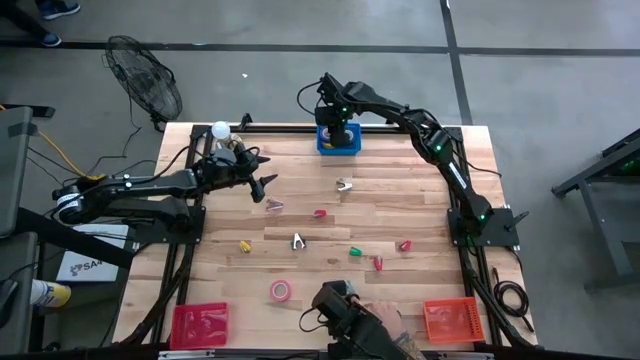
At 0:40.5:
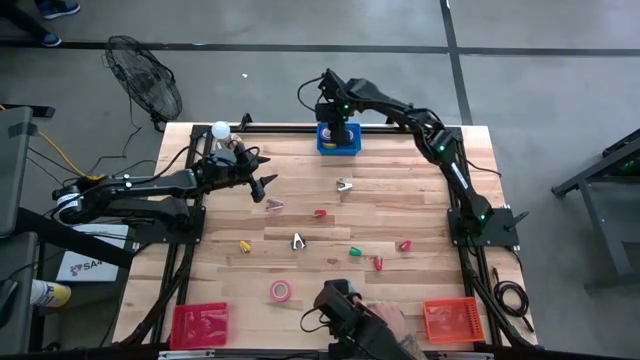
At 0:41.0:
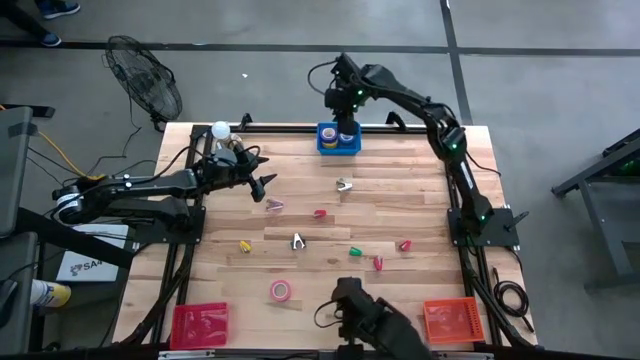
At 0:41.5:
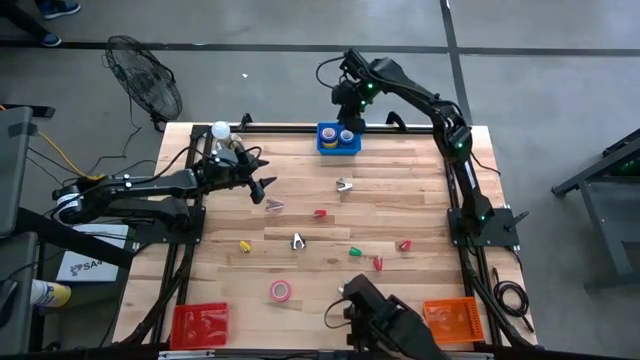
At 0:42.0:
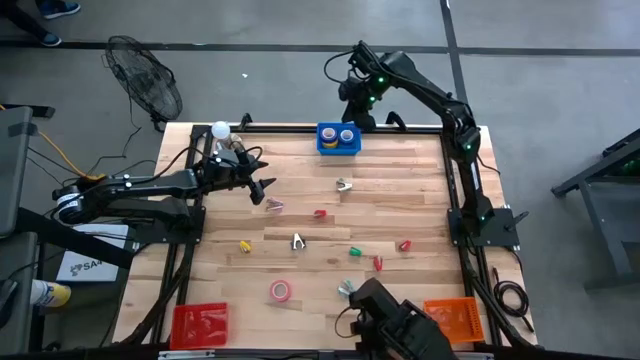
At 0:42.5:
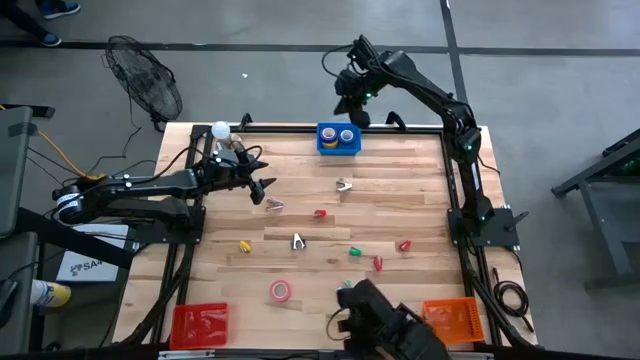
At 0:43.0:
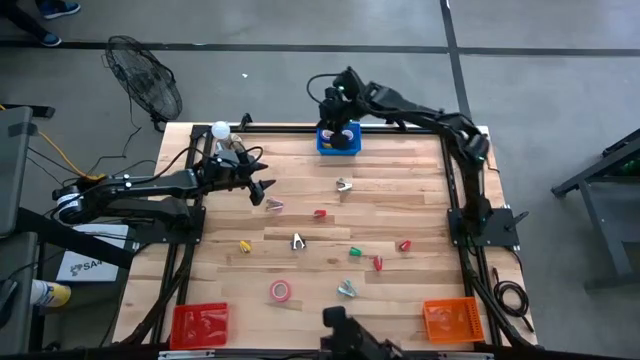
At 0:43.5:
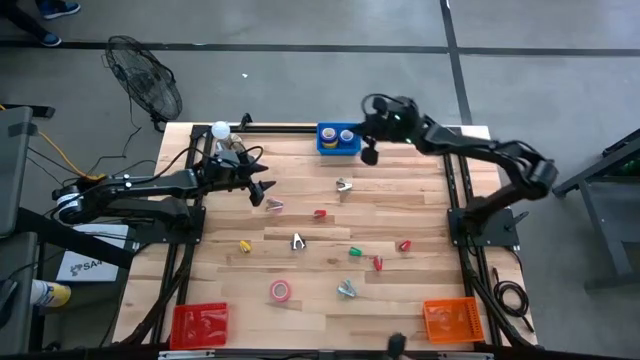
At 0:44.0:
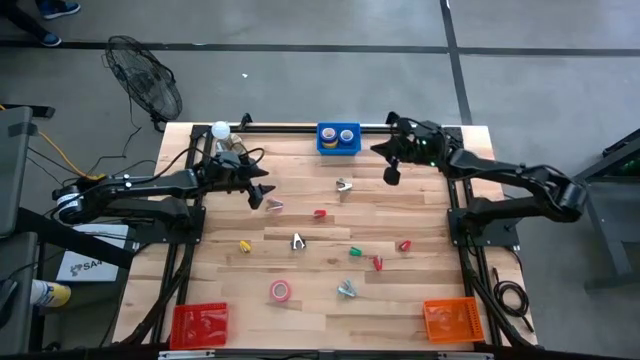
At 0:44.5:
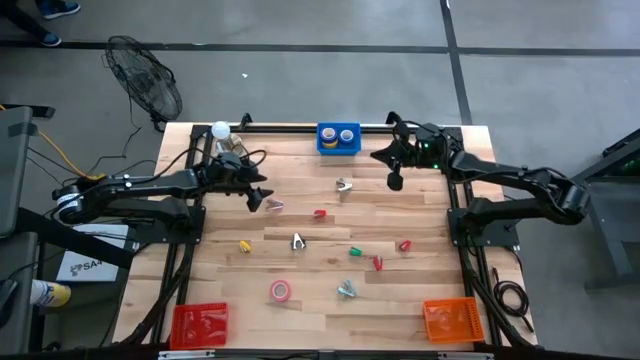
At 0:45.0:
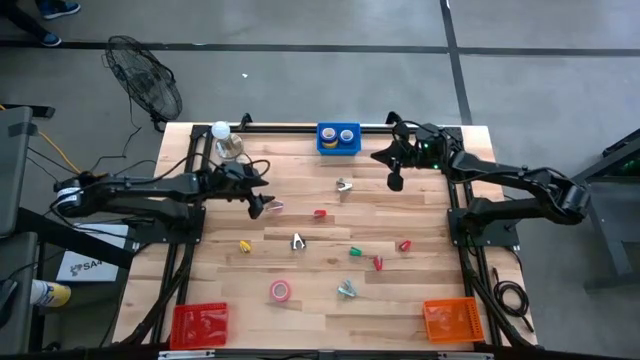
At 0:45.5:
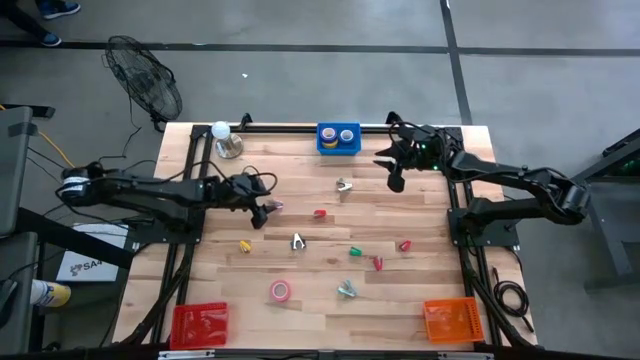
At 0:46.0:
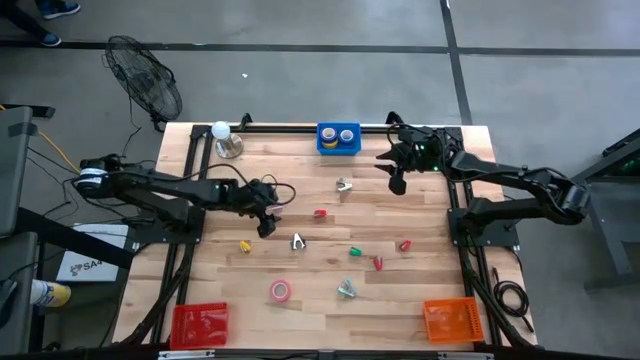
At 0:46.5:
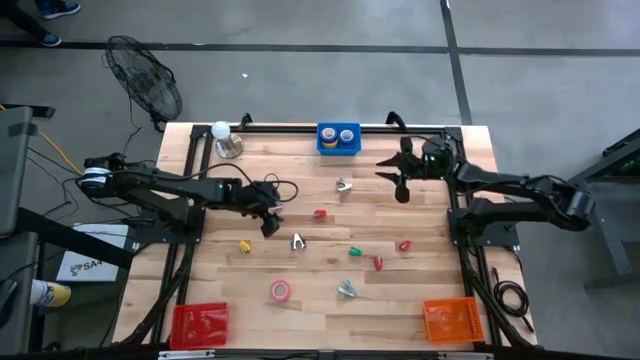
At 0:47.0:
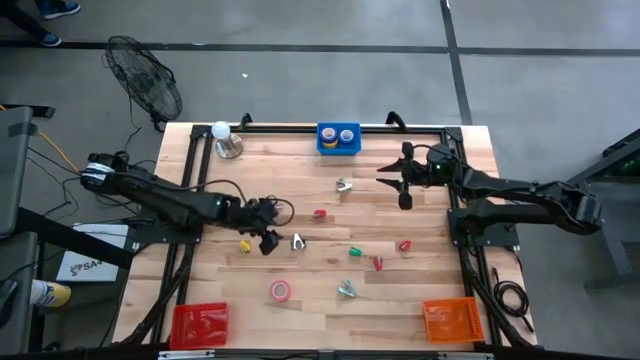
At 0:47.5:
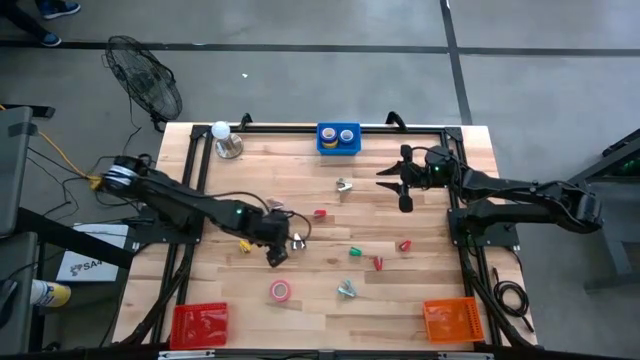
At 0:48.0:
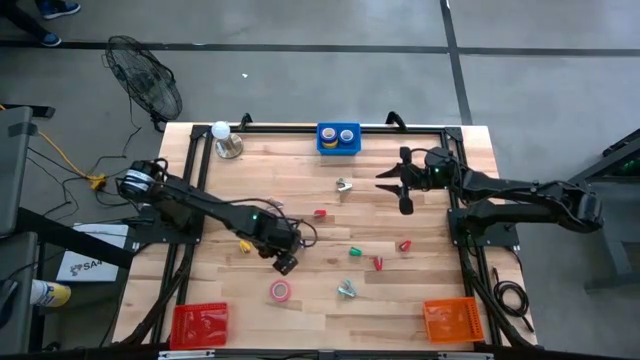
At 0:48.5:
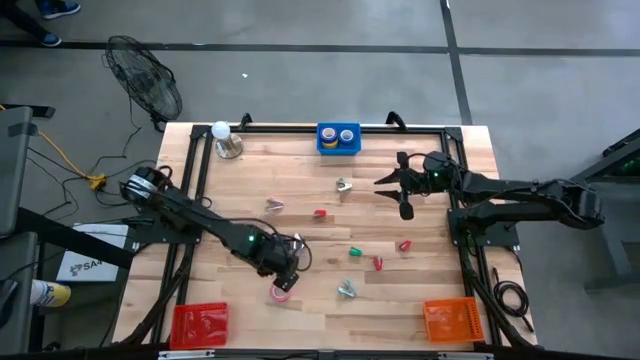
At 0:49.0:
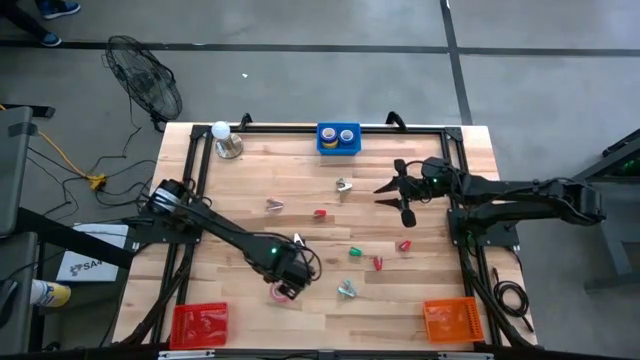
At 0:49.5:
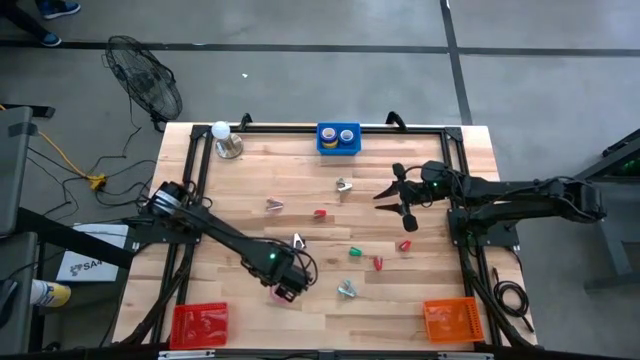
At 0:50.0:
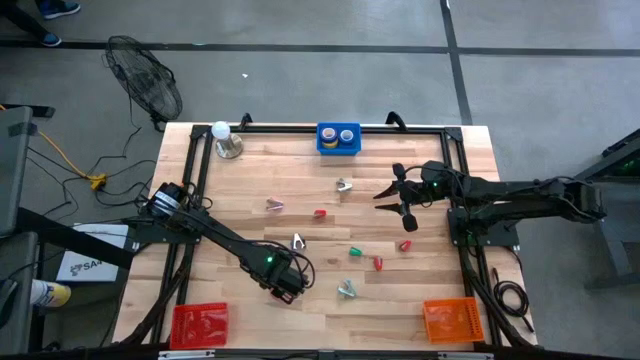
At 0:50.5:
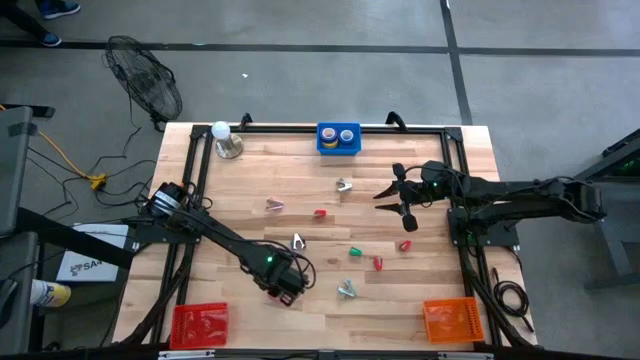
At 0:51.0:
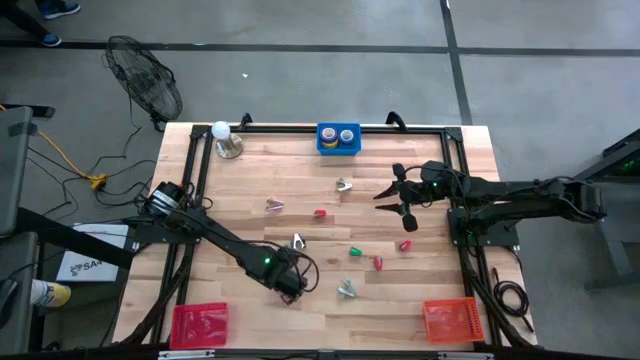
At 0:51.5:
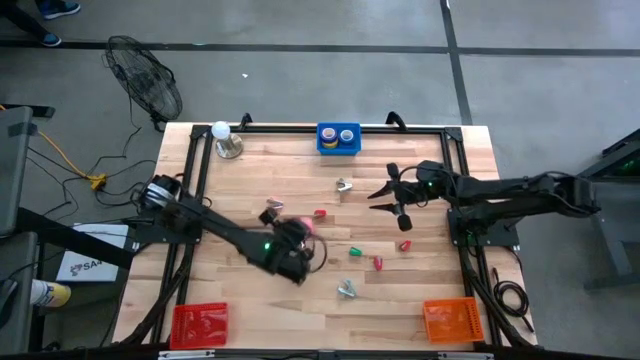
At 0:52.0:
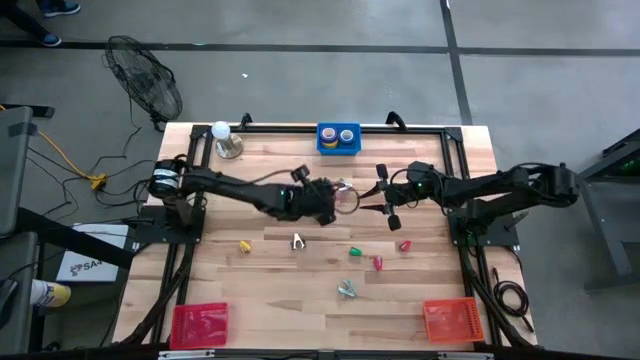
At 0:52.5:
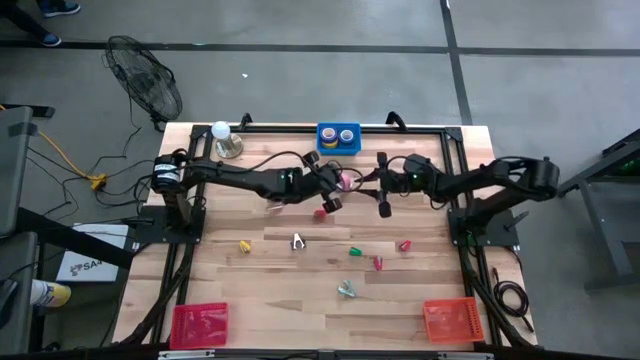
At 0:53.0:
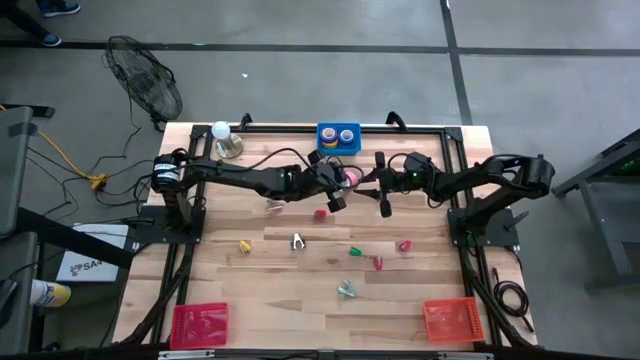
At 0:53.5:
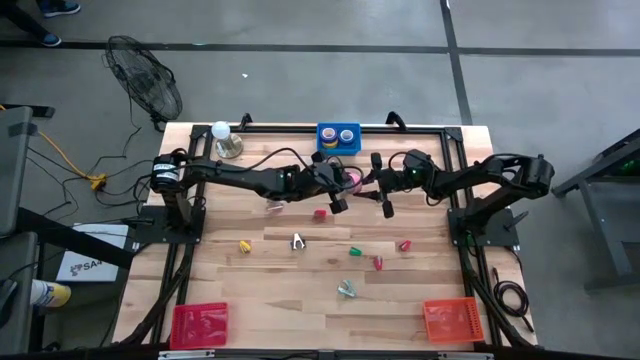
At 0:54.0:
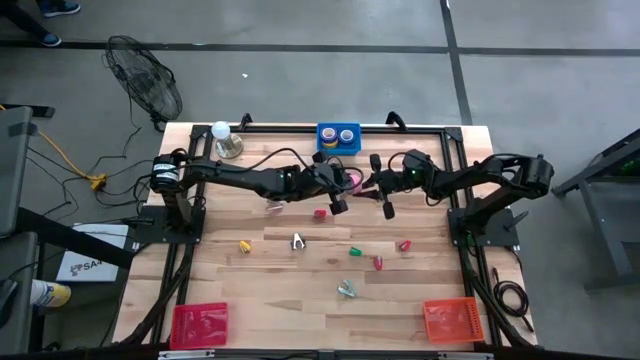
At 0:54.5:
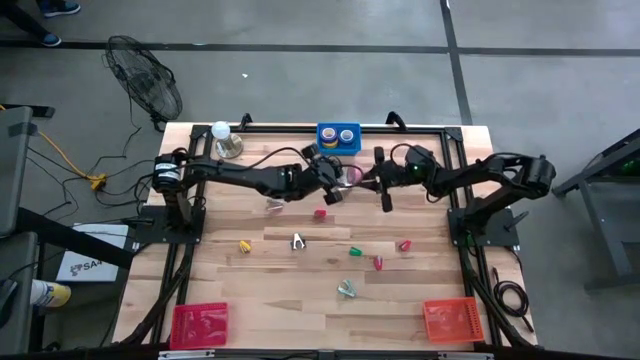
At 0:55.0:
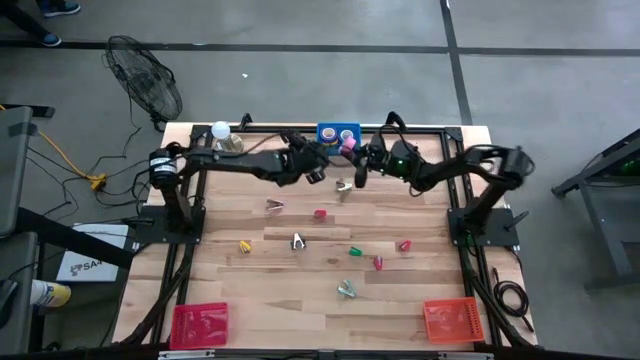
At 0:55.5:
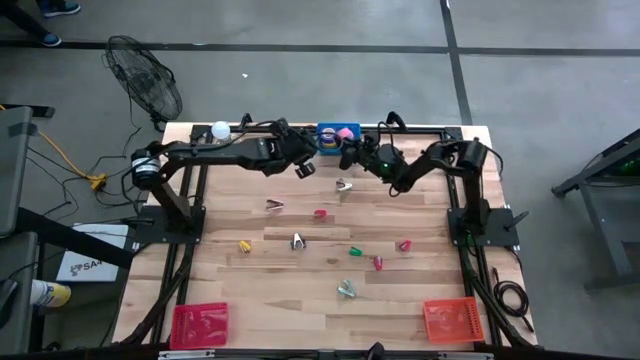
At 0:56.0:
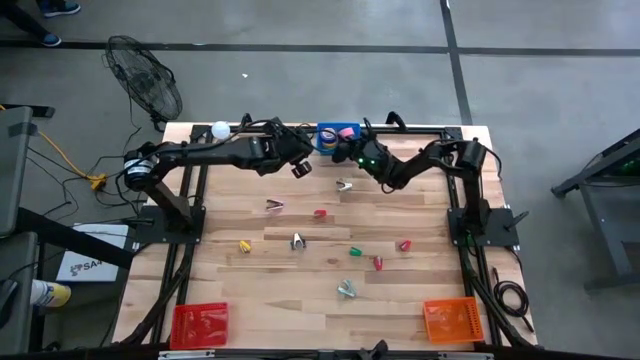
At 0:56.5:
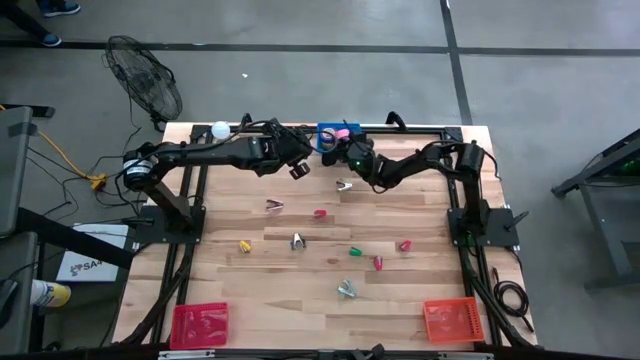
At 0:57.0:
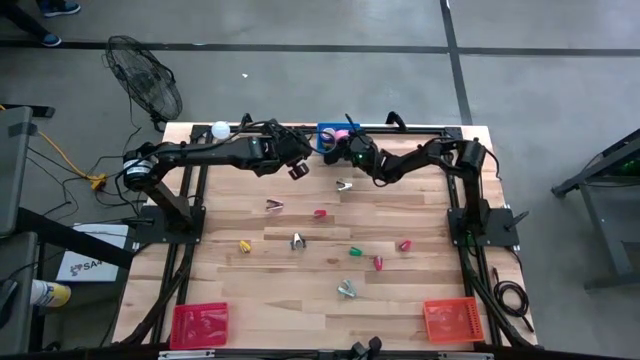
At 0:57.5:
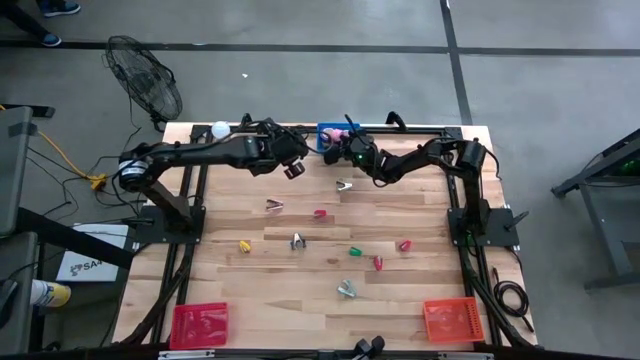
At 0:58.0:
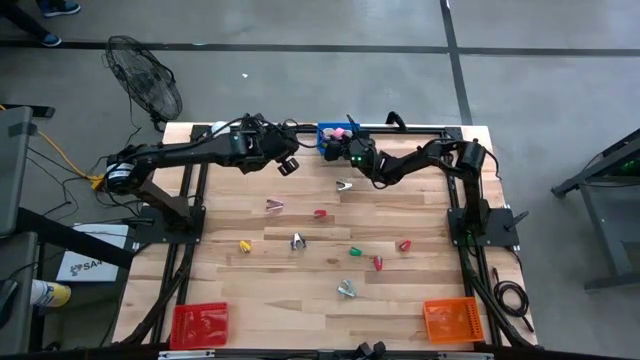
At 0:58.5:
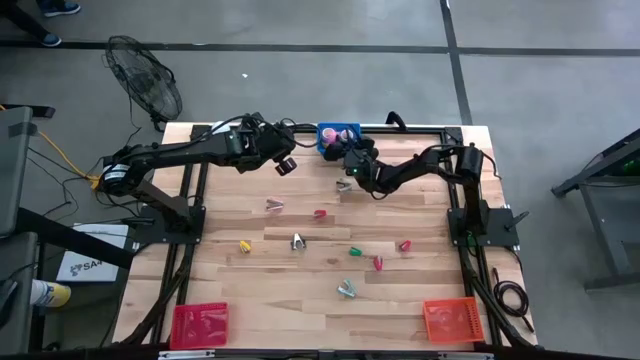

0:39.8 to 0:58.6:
Task: Pick and place Stapler, Stapler remover, tape
Put the pink tape into the blue bin

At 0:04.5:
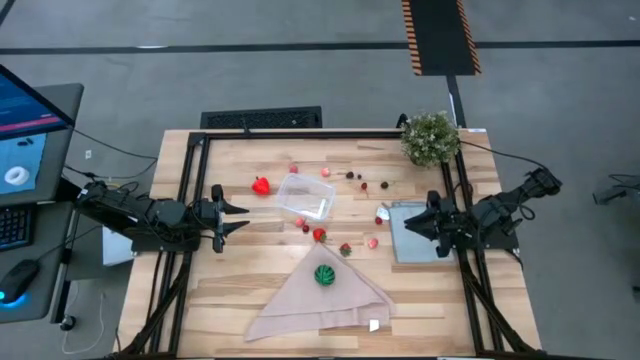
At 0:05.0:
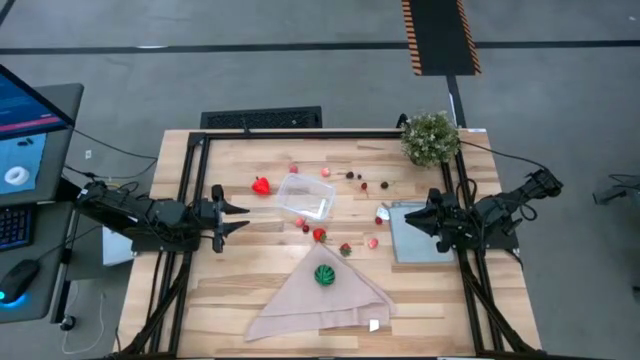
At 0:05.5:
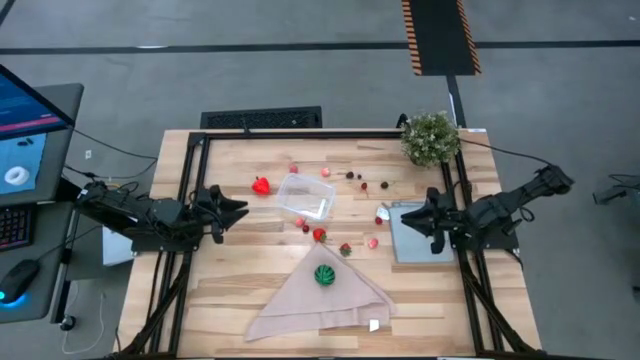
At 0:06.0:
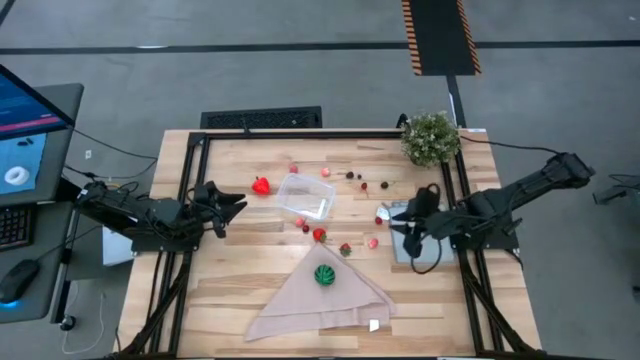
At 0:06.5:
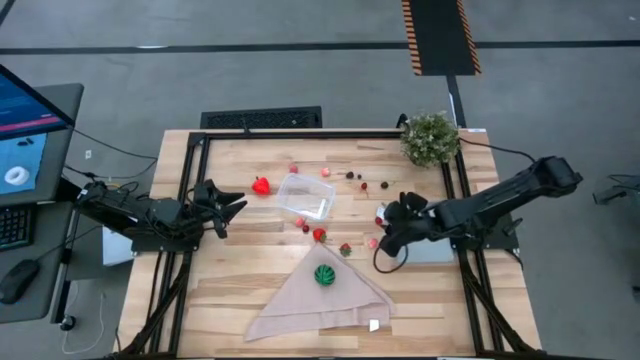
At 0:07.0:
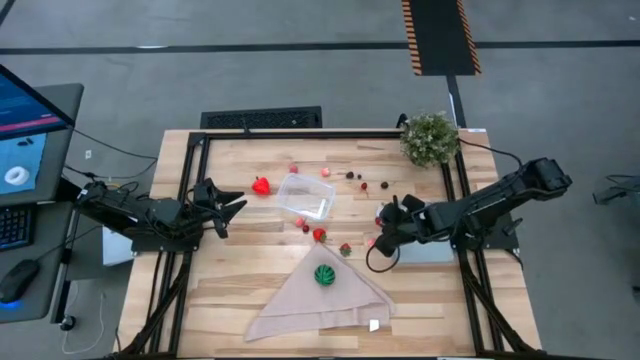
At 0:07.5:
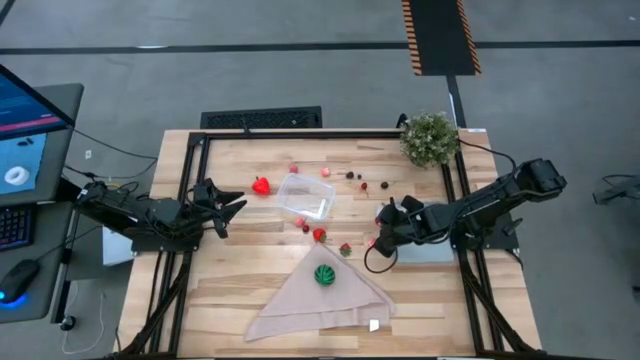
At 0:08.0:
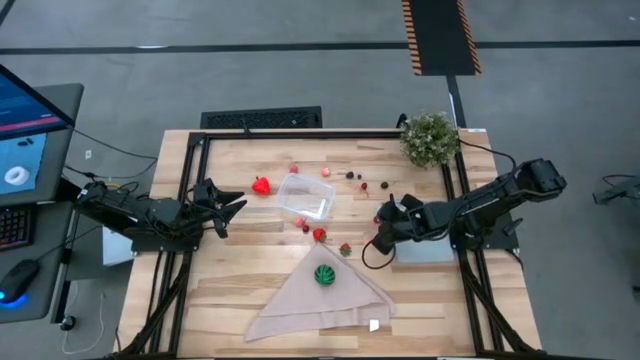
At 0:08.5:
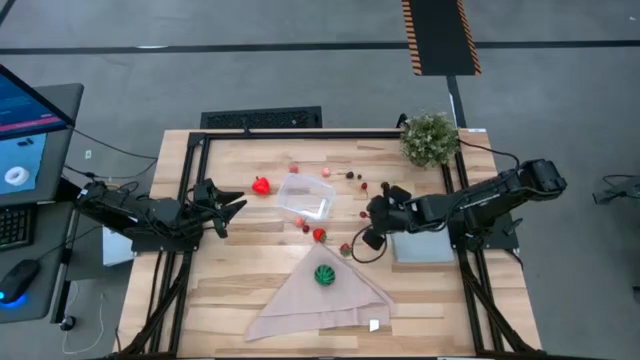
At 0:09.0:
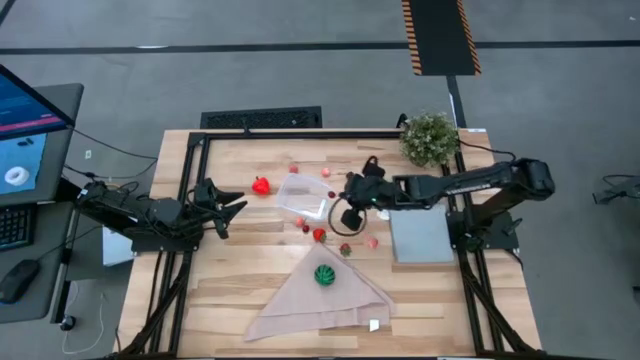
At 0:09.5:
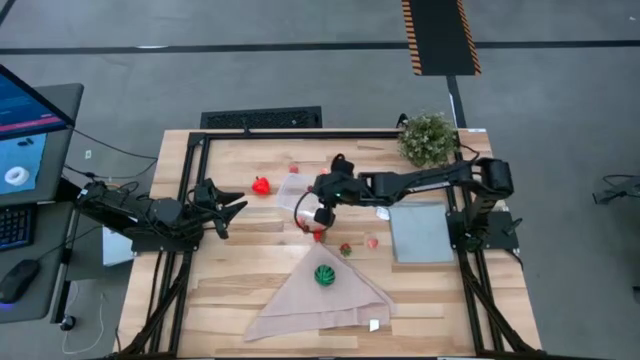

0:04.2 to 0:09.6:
Task: Pick and placing Produce into tupperware
Put the bottom left red cherry into the transparent bin
